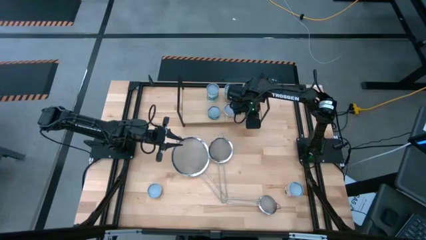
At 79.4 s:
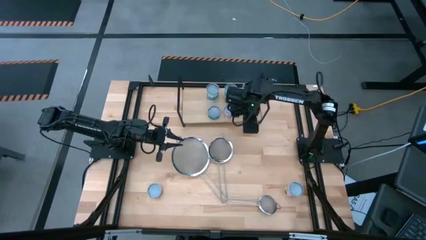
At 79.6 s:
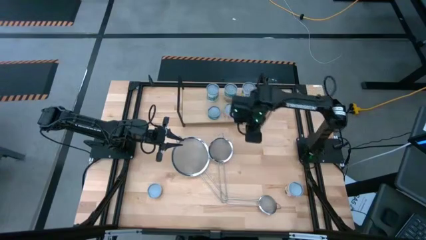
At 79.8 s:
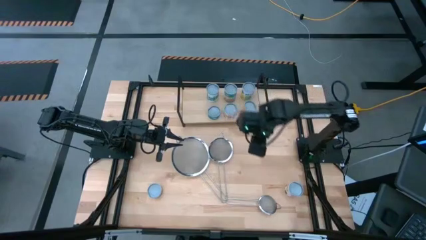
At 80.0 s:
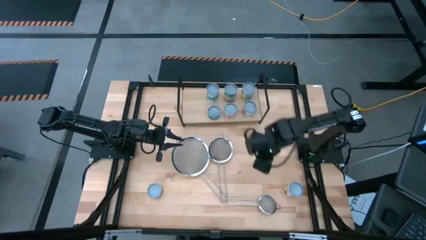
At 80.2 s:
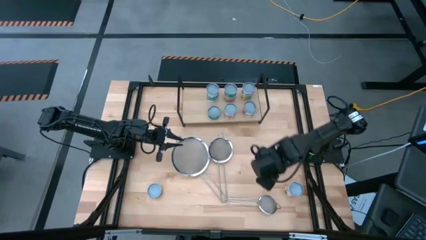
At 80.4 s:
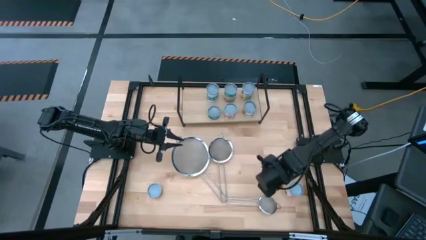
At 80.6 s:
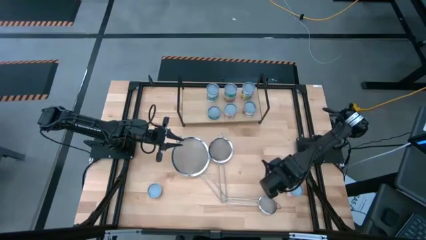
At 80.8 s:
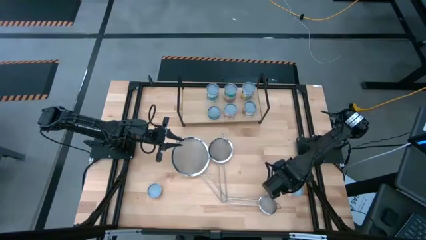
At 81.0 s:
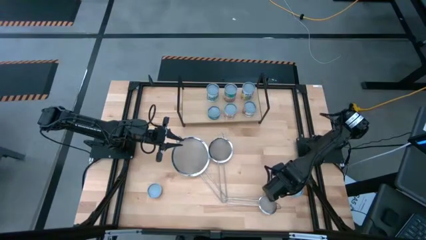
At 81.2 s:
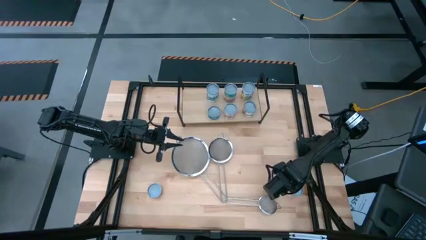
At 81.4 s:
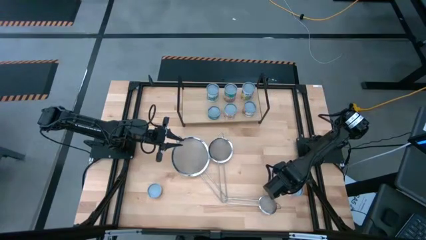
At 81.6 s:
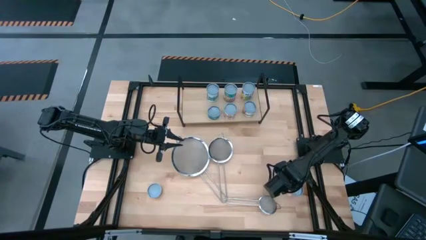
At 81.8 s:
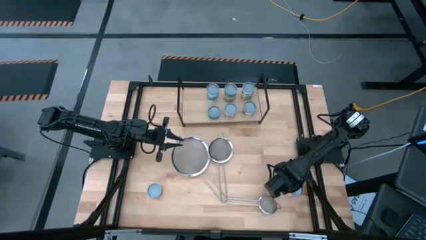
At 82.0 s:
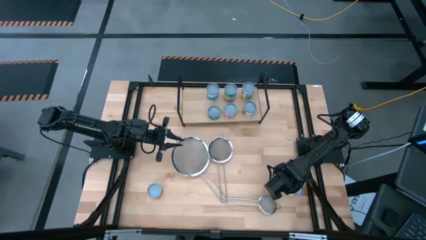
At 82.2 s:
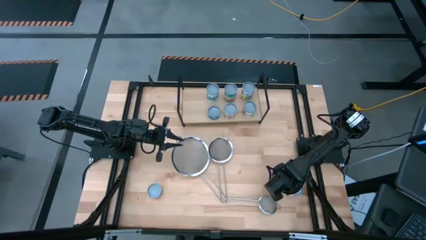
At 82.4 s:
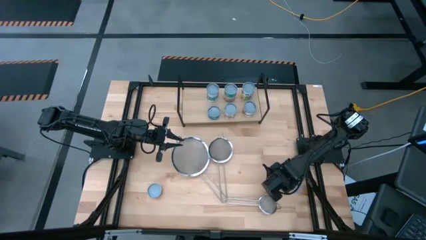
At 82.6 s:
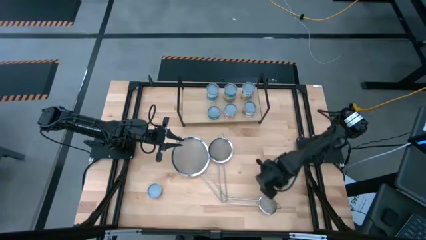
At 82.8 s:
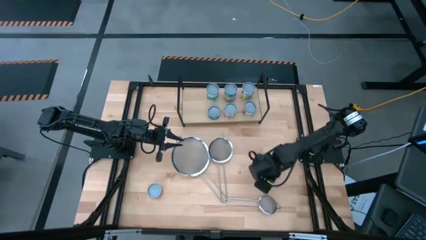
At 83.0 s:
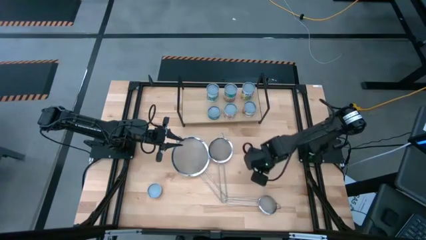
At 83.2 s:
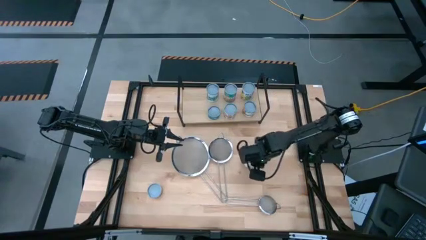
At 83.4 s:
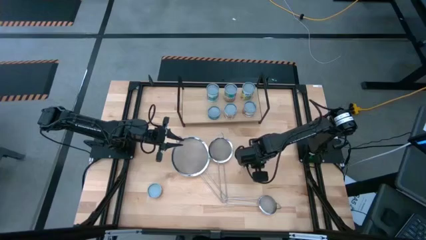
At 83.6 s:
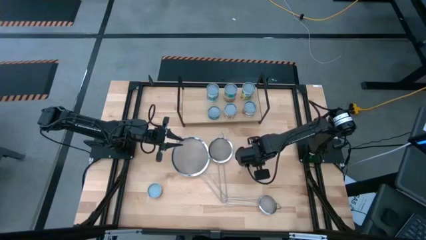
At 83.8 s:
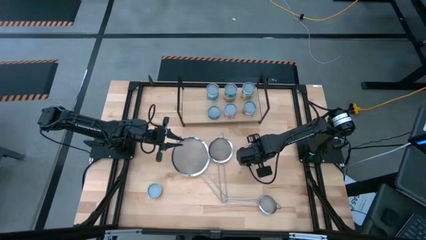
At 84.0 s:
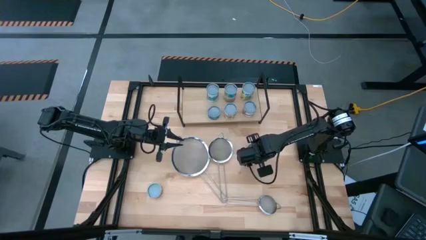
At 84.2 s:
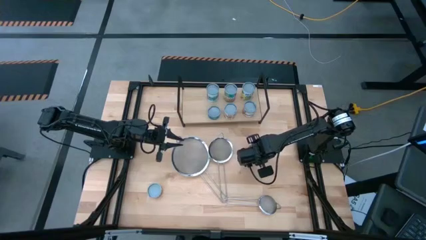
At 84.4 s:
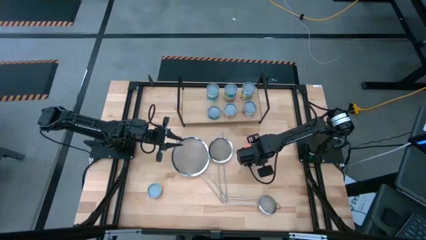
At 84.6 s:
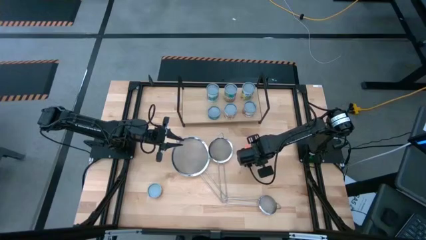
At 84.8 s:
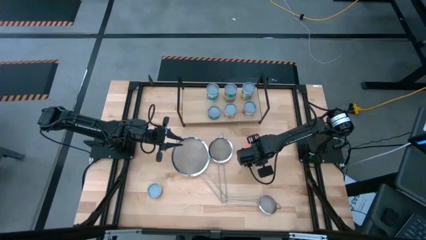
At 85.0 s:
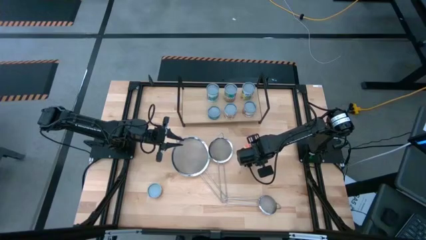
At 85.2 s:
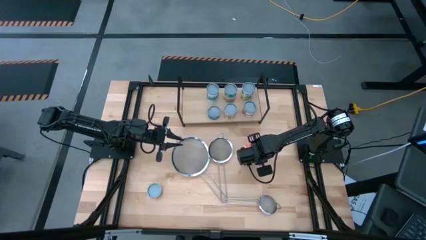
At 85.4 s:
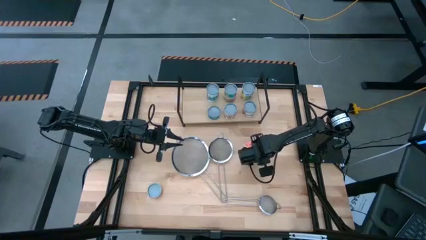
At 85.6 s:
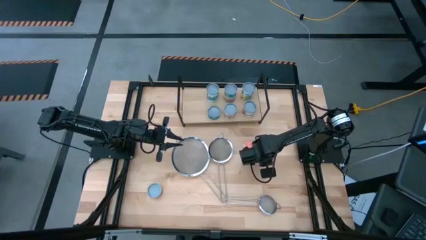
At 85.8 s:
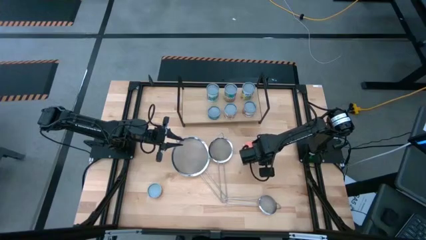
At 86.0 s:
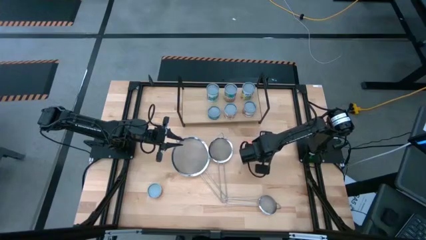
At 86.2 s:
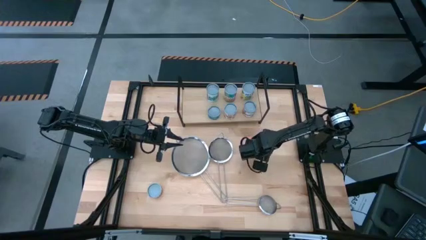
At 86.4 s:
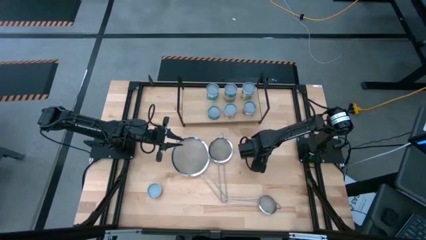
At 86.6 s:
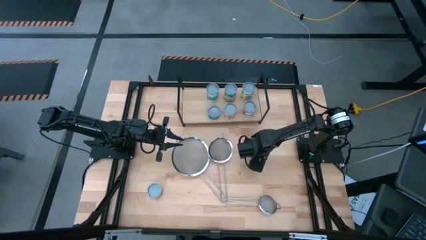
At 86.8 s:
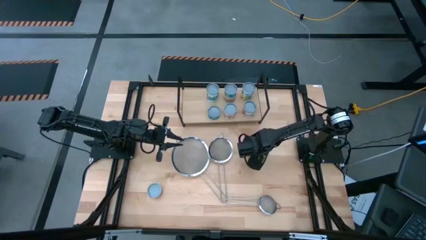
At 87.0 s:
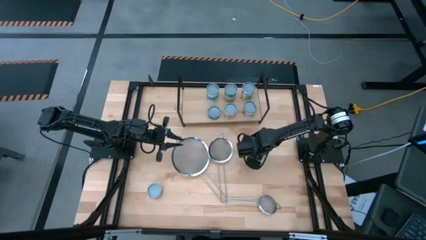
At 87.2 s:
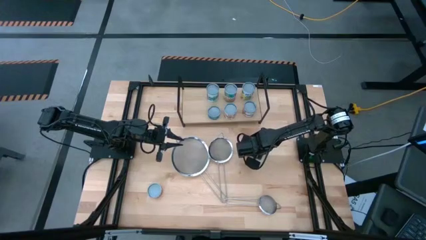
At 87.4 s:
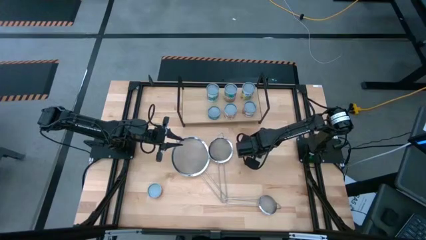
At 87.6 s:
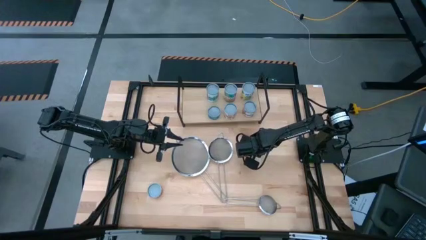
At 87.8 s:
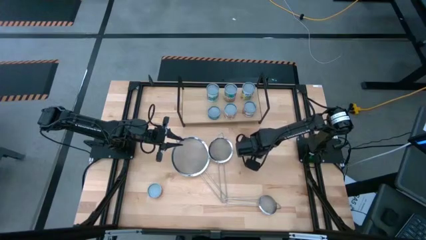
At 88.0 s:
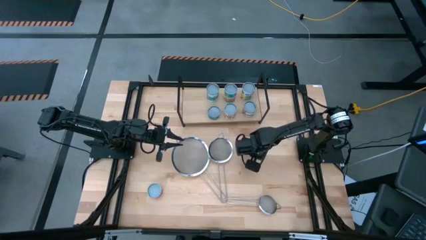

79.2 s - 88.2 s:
Task: Pick and place cans onto a shelf
Put the canned meatballs on the shelf

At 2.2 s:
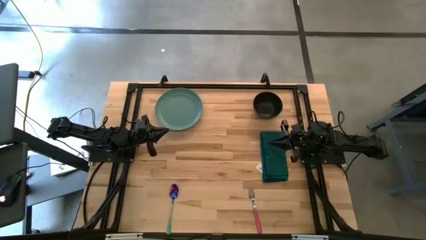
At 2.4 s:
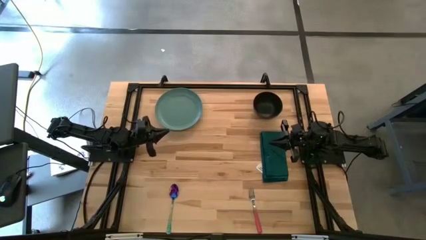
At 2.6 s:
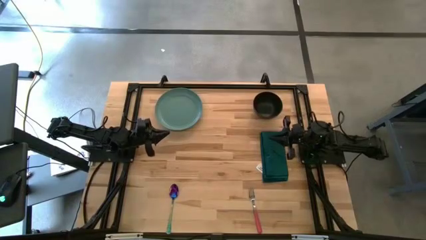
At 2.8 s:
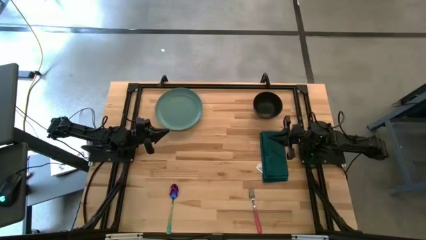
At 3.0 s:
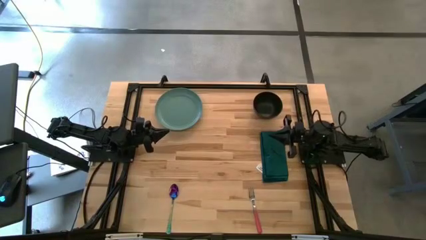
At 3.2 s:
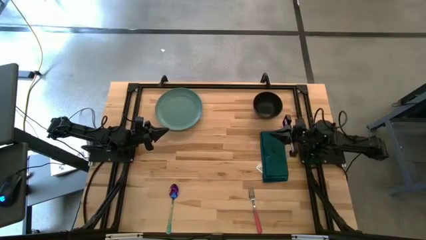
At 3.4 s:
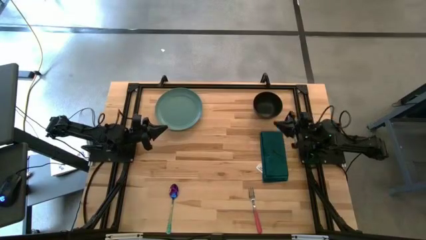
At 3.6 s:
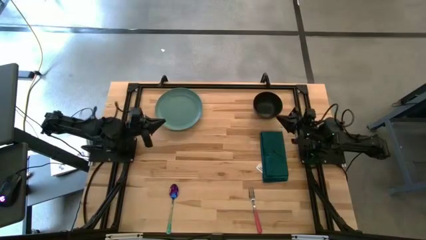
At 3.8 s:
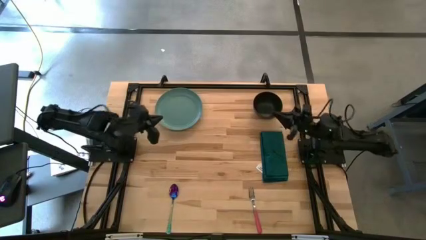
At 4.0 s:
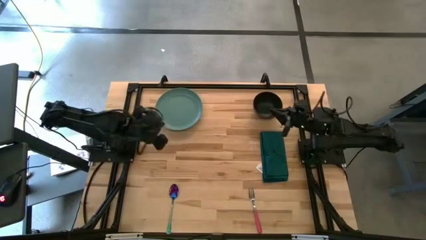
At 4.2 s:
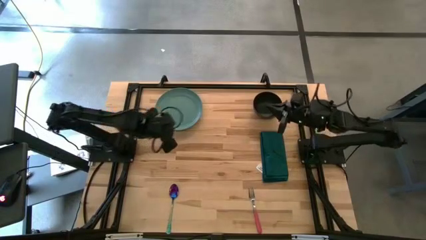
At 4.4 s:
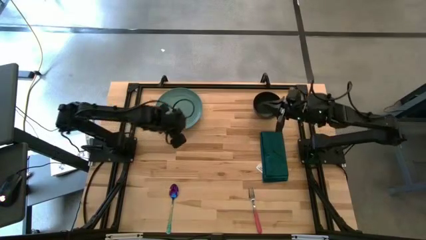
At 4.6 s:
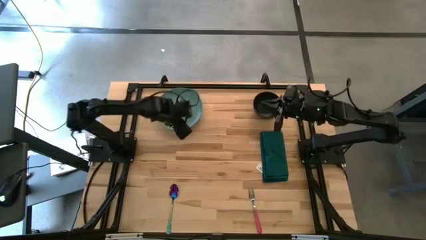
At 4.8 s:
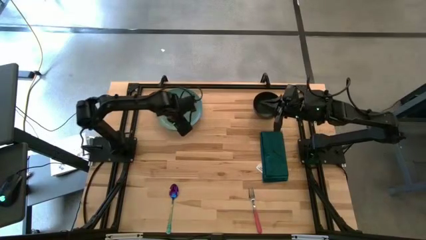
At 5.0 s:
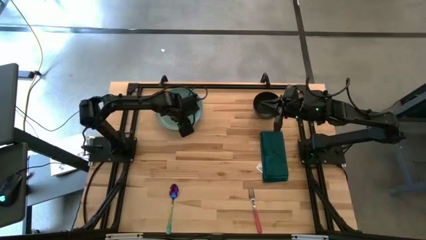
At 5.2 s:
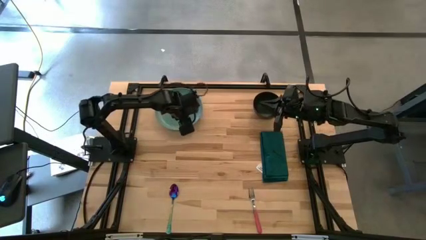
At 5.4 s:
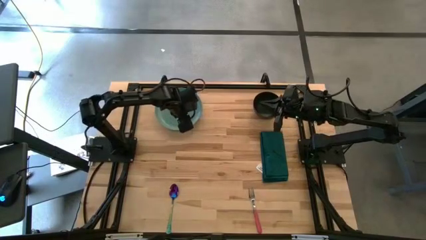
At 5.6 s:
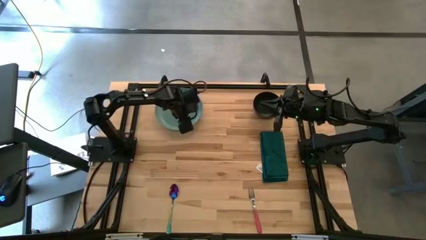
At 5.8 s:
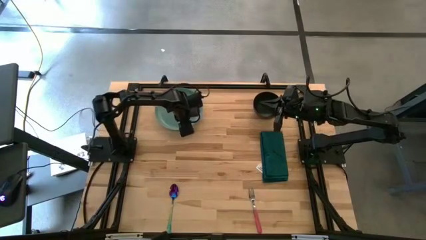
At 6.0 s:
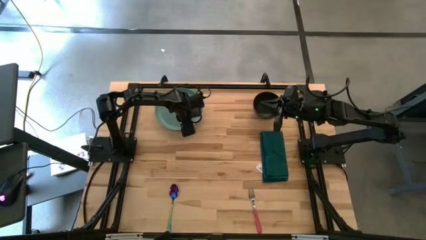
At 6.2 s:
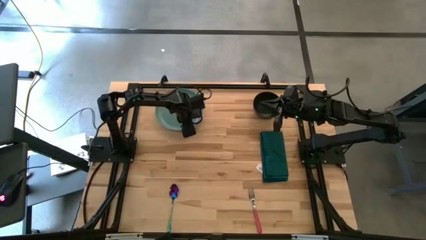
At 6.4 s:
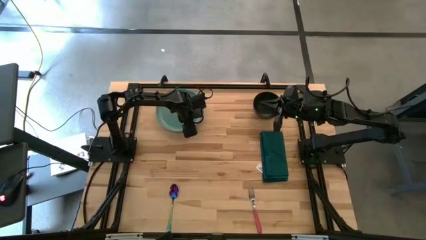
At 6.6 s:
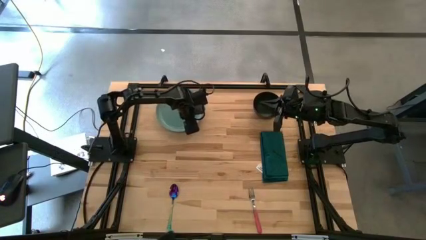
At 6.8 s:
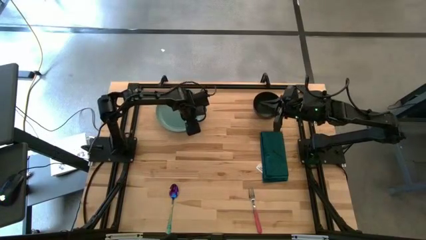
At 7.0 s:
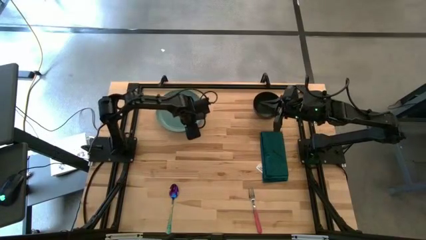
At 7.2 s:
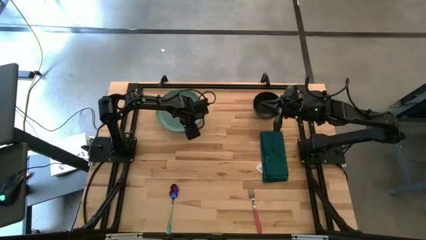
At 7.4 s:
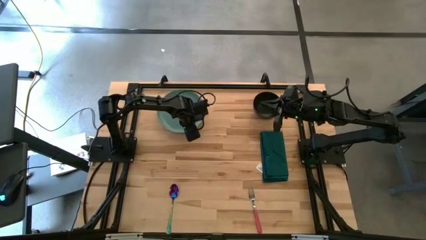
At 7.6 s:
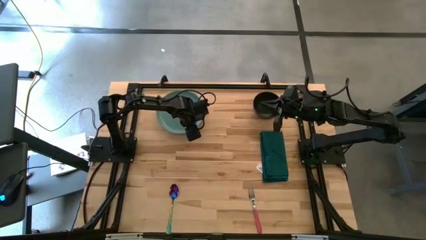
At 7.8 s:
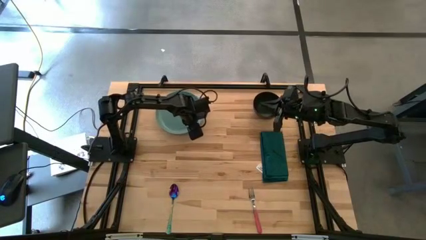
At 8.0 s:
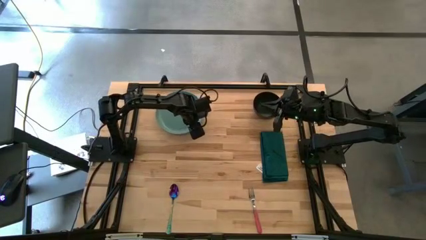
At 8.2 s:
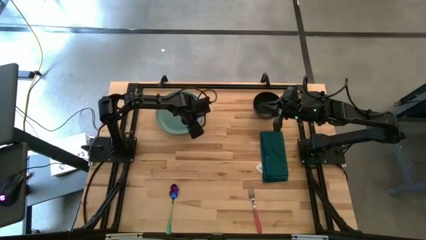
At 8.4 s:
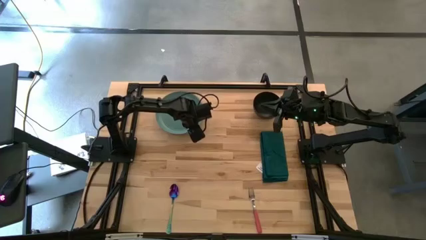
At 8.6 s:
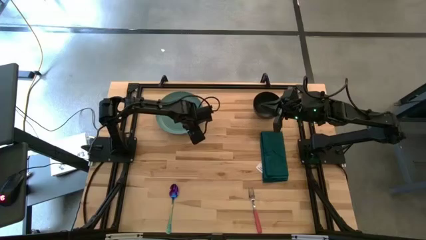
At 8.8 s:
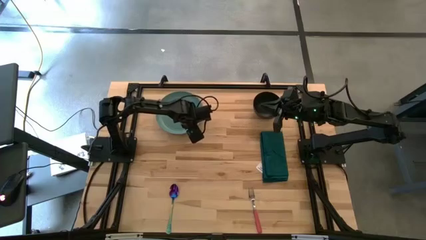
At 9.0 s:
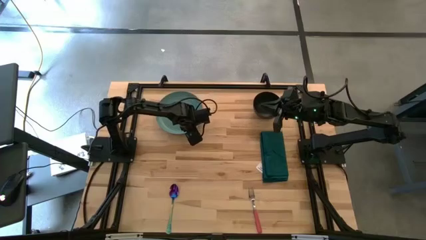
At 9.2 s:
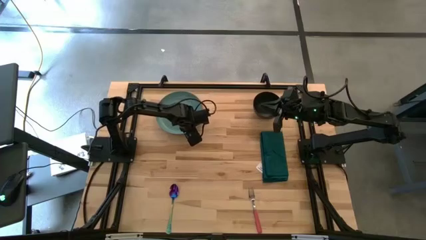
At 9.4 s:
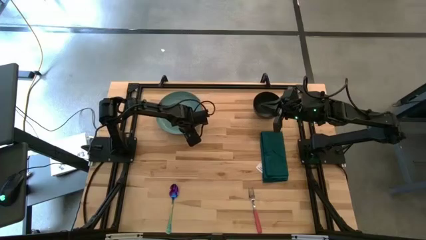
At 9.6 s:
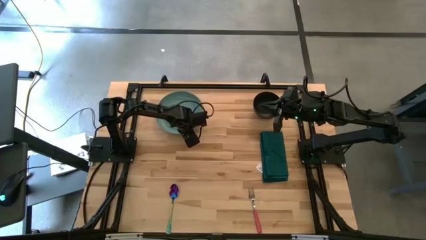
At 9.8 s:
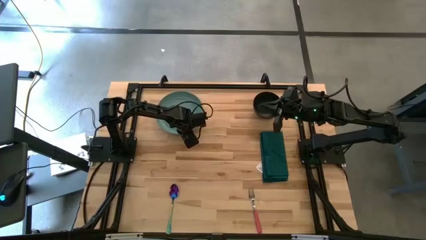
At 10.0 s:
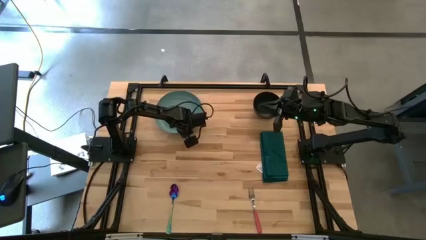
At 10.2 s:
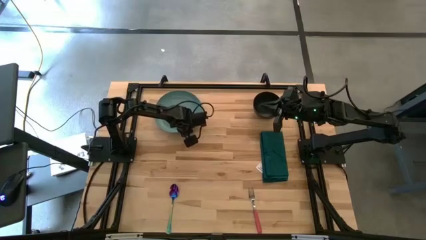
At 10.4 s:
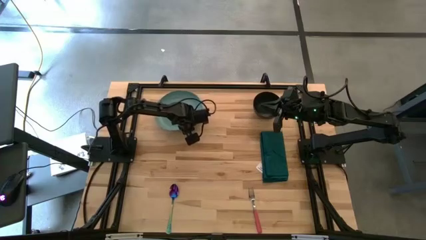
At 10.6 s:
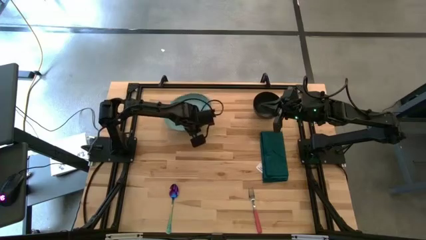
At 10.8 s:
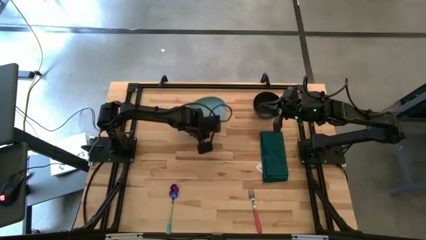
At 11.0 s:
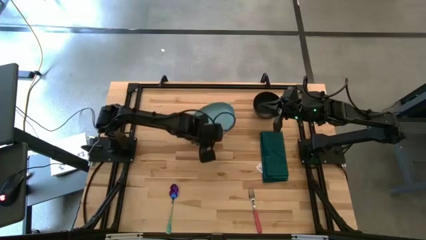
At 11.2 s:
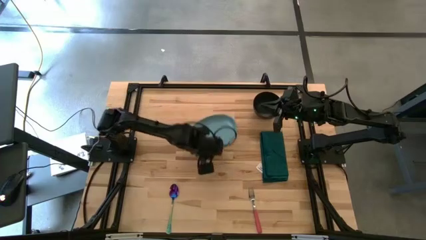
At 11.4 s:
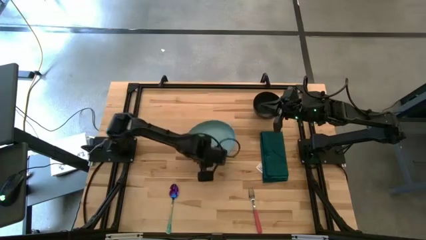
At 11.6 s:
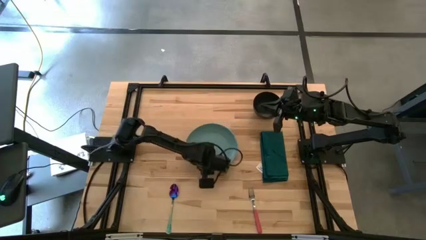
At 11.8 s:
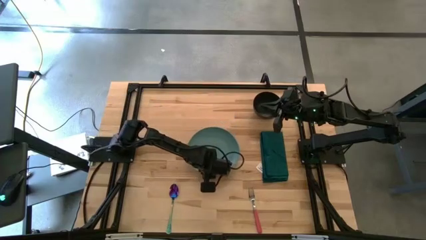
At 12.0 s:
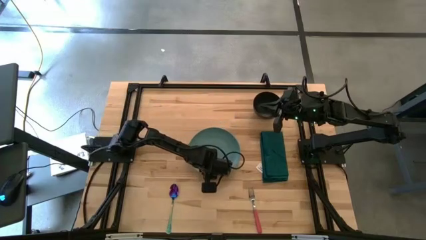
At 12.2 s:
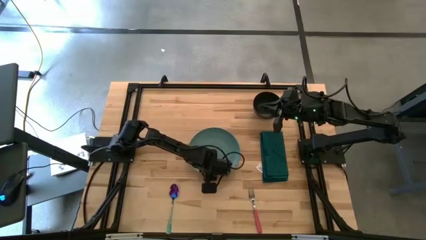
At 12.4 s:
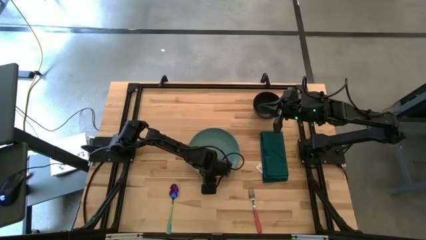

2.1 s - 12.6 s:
Task: Set table place
Move the green plate from the top left to the center on the table
